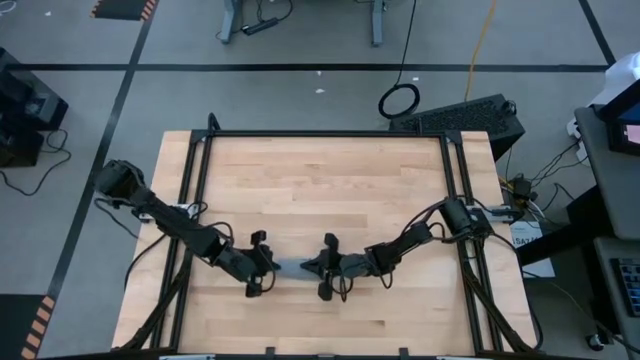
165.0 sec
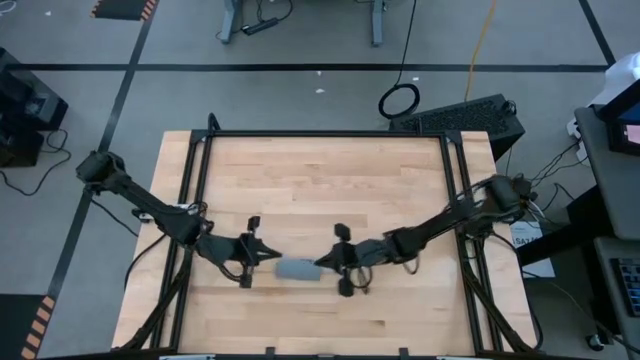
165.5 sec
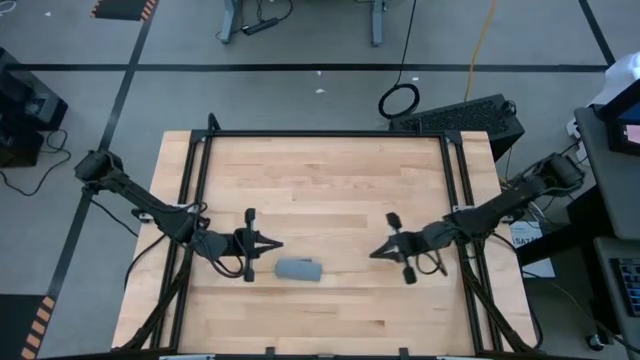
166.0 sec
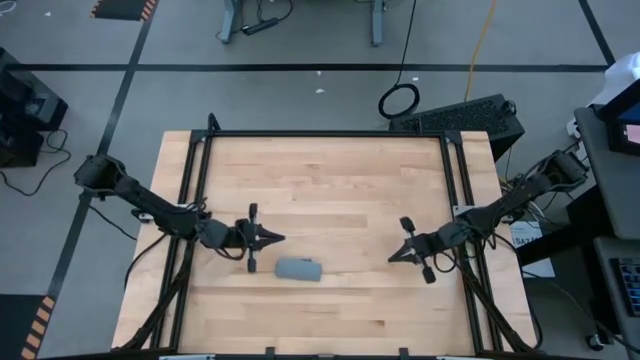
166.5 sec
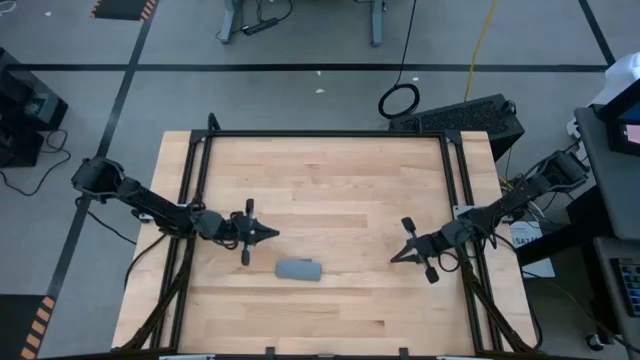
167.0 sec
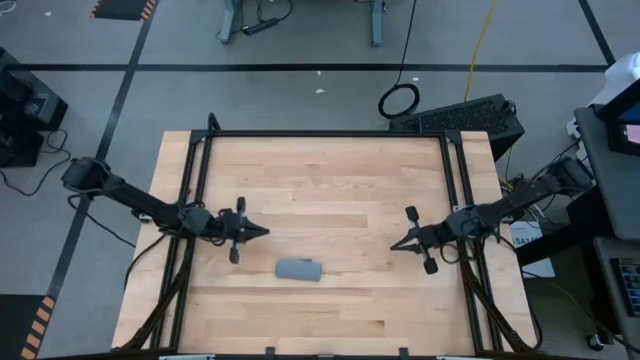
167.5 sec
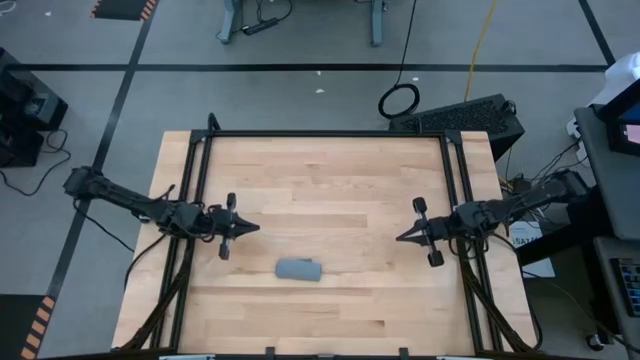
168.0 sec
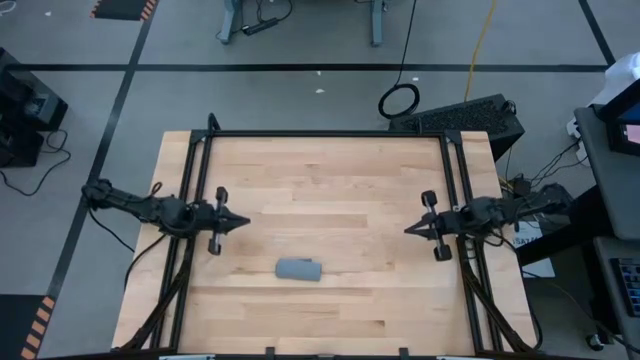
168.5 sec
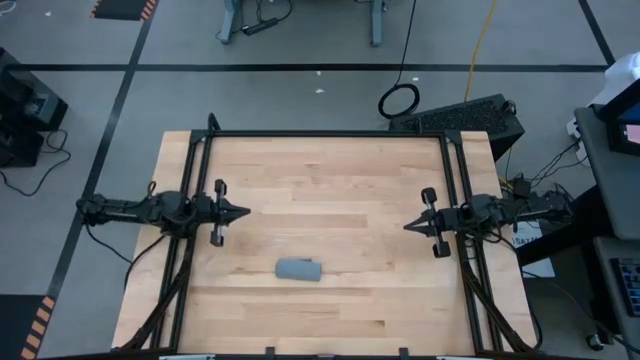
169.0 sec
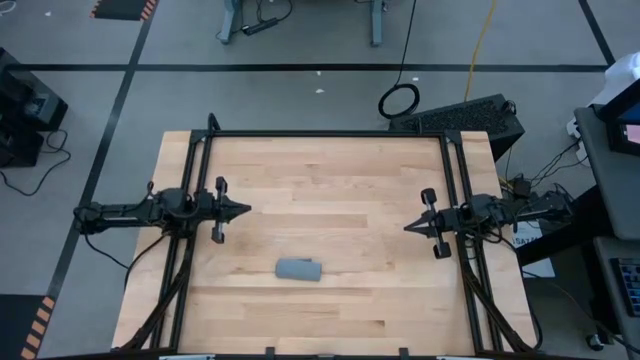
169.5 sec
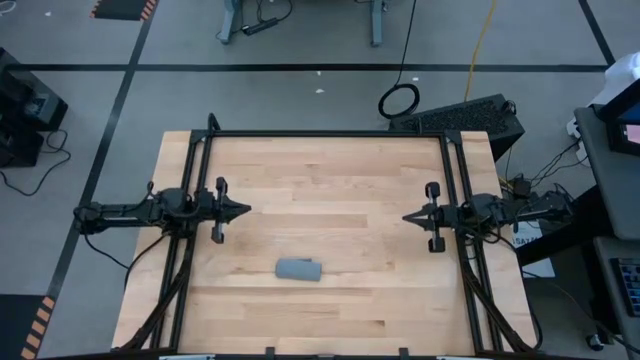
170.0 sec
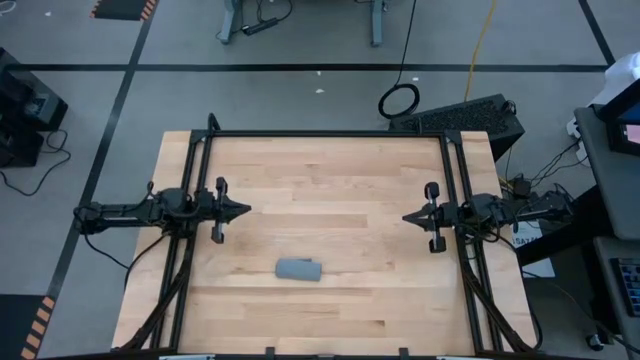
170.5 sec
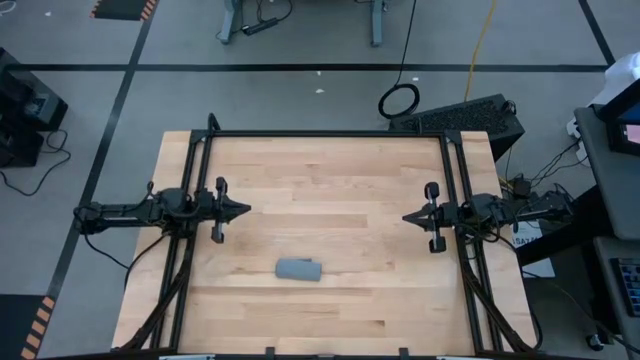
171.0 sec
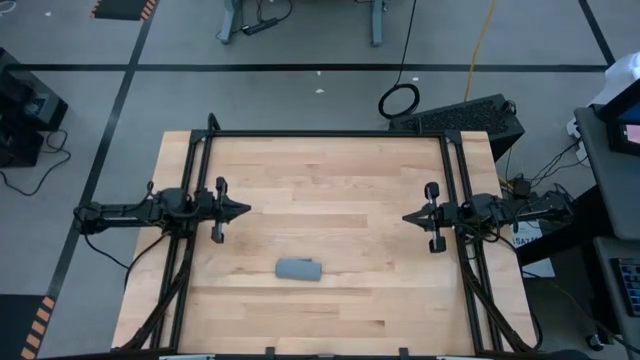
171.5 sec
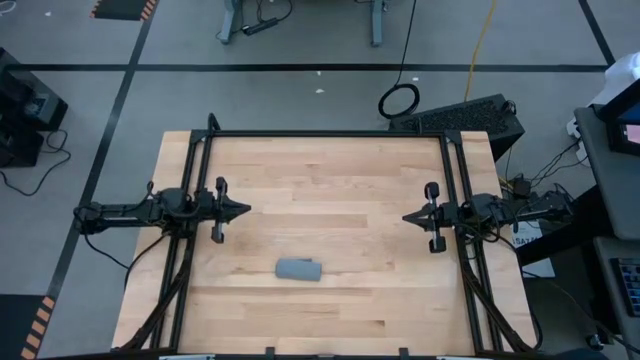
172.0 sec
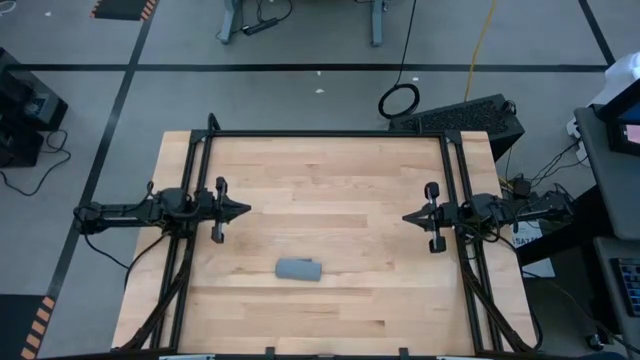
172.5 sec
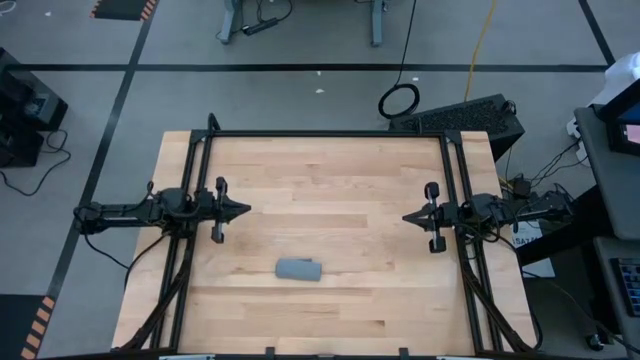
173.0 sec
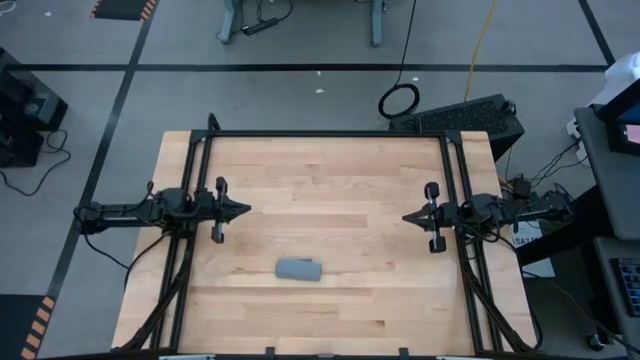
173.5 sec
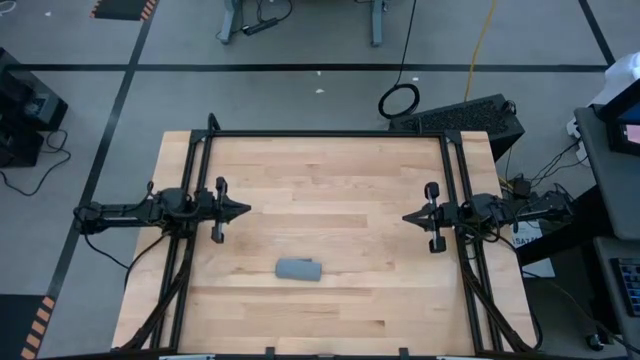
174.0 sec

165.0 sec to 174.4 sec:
Task: Roll towel
Return to Home Position

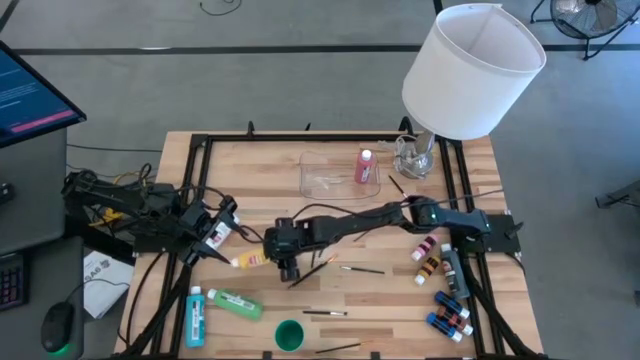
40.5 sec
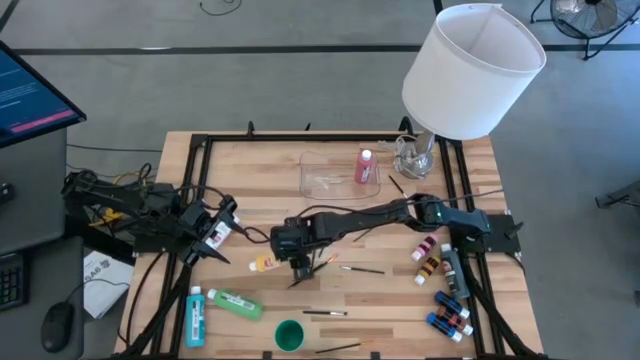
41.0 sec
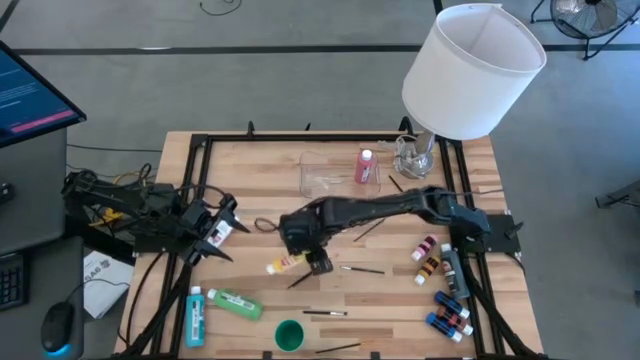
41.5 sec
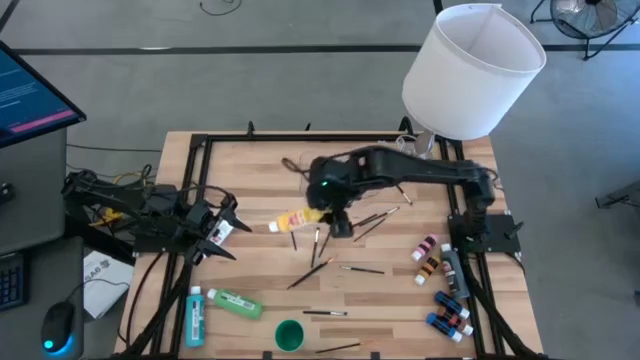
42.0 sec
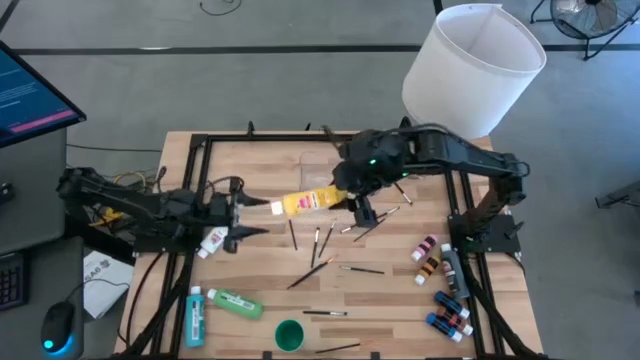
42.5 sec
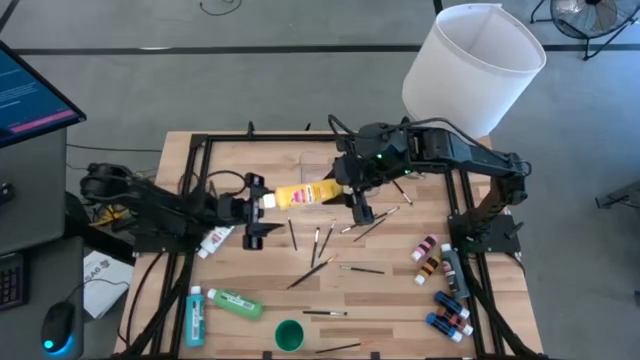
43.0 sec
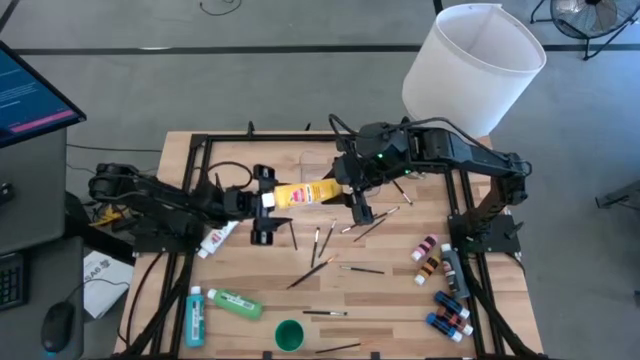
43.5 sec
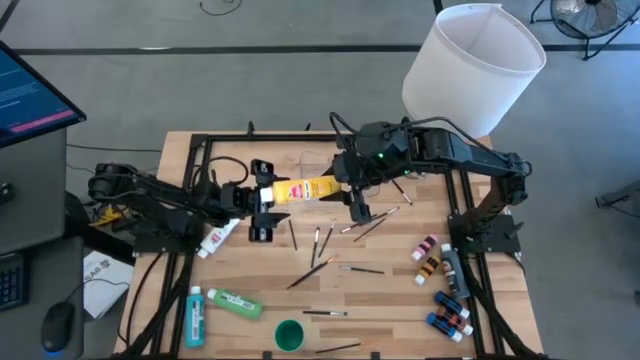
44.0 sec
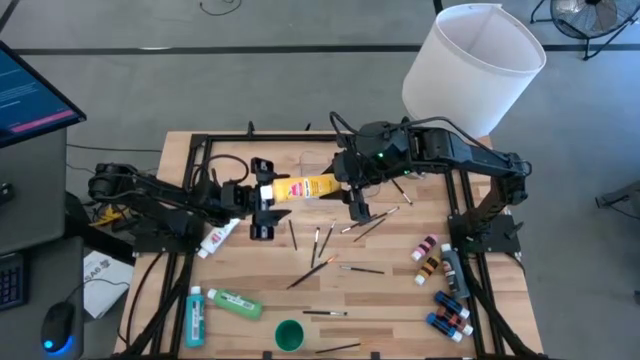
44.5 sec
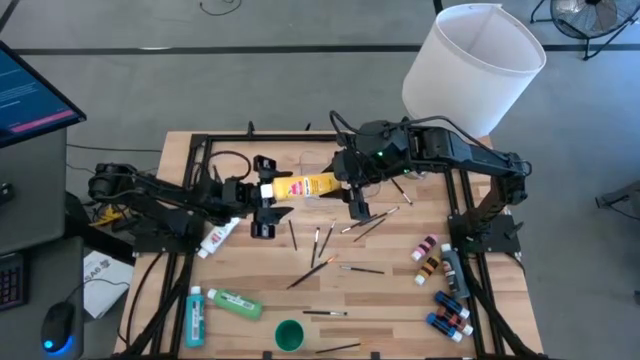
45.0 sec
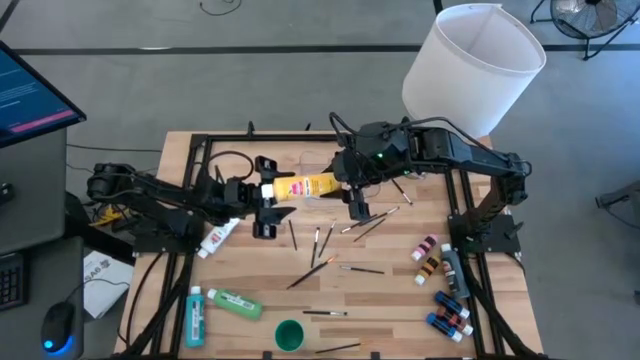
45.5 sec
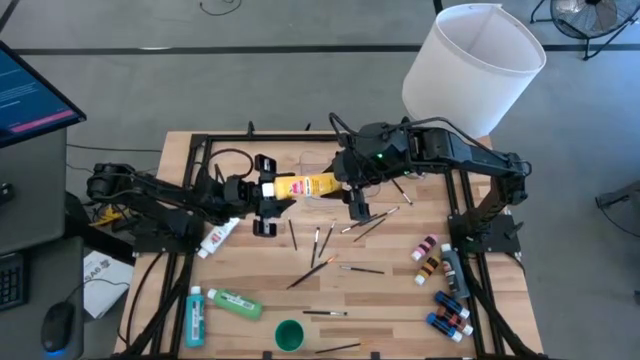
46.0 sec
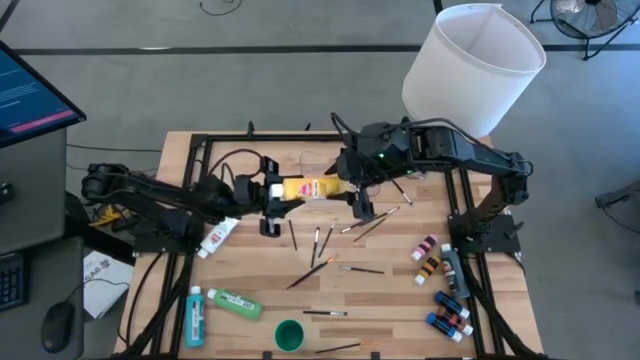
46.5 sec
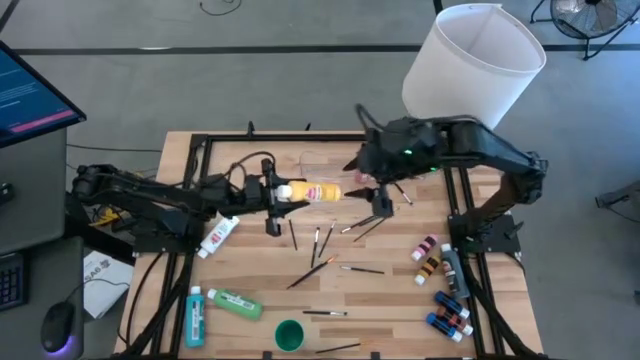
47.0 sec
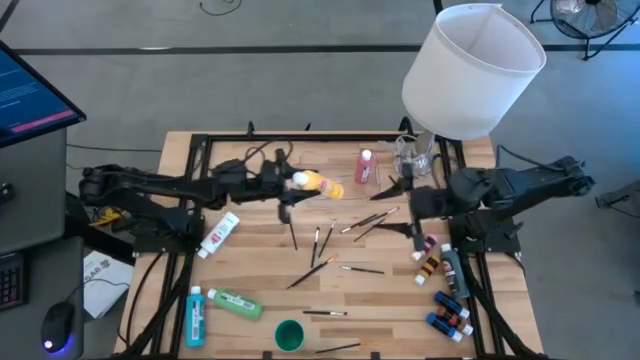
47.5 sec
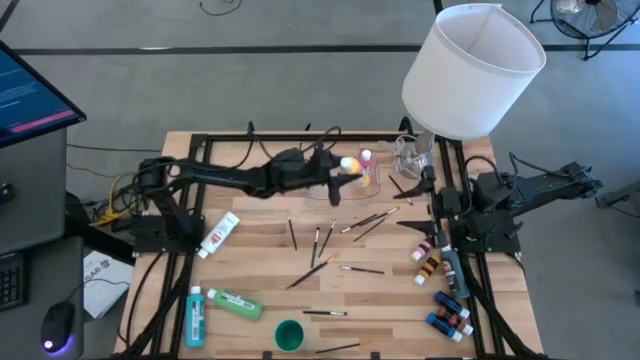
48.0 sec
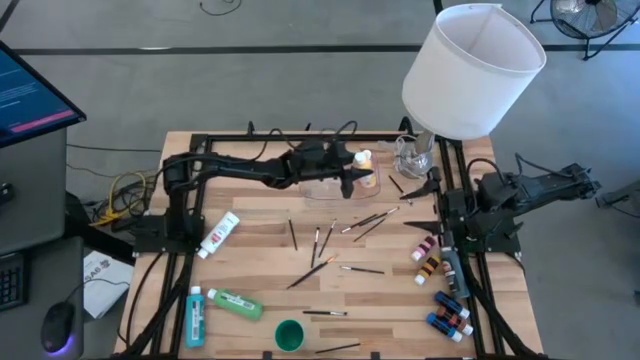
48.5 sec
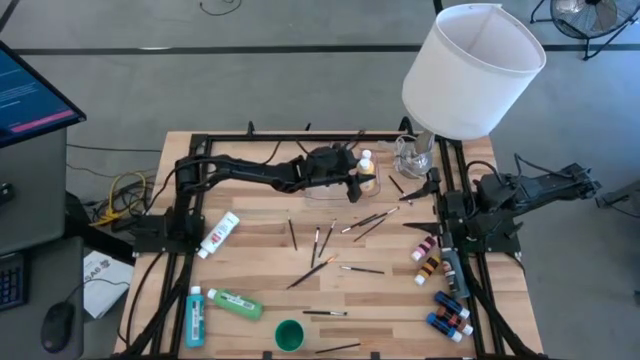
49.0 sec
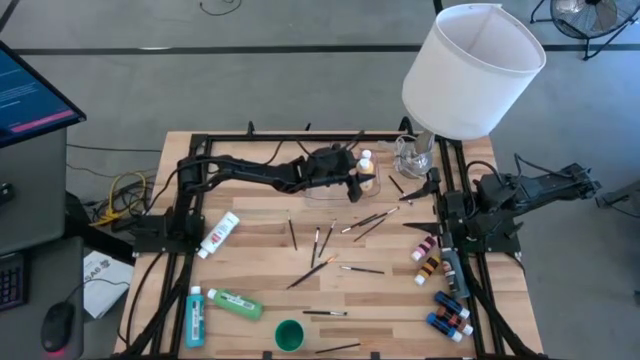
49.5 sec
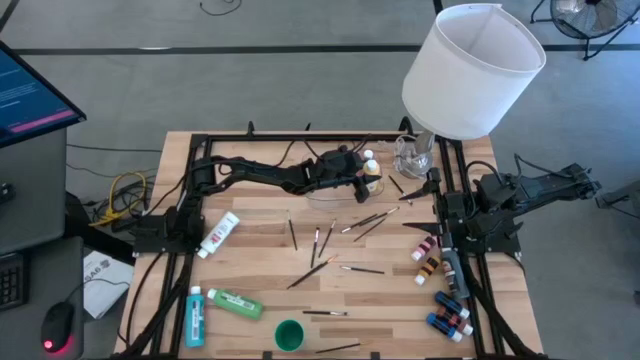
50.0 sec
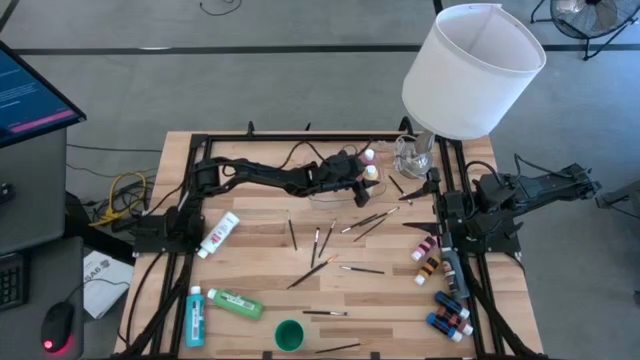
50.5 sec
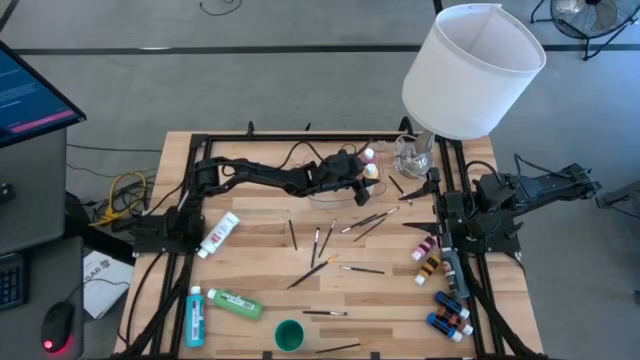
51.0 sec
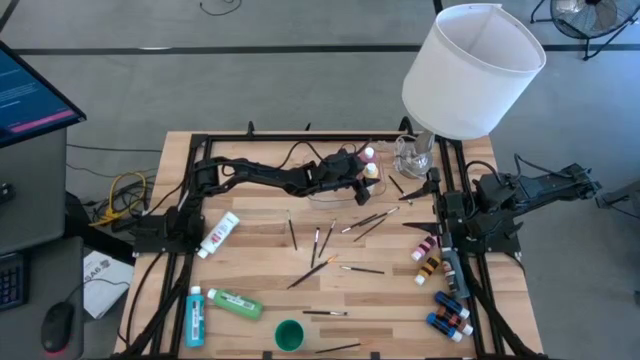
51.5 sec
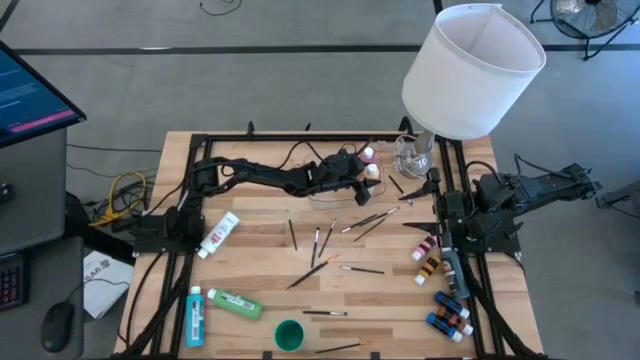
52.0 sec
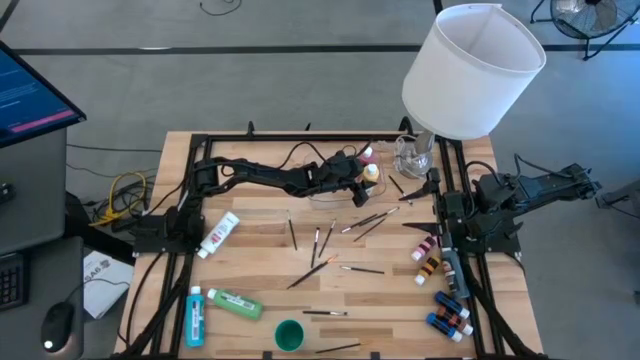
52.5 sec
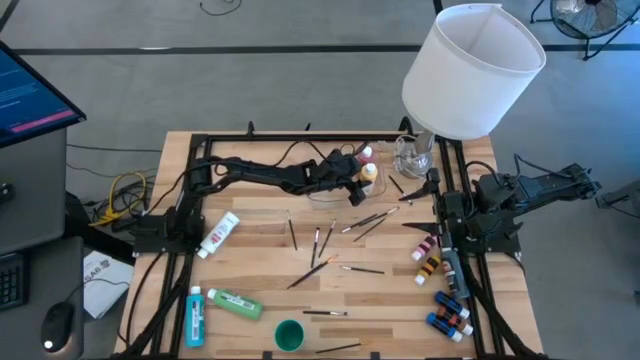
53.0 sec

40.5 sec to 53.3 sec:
Task: Pick & Place Paint Supplies
Put the big yellow paint bottle into the transparent bin
